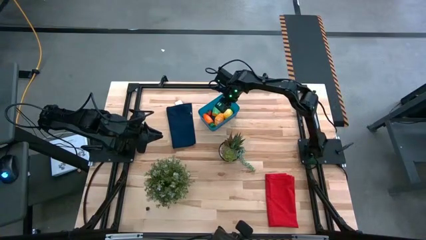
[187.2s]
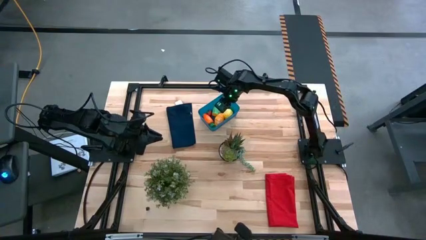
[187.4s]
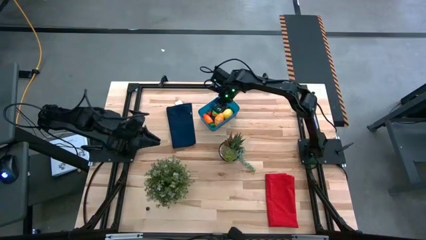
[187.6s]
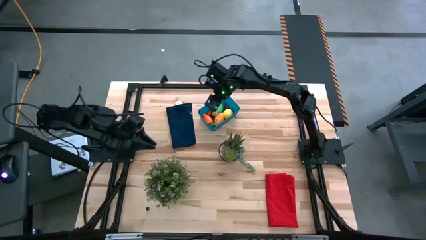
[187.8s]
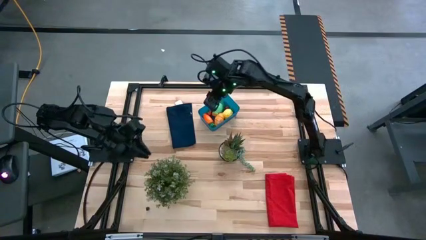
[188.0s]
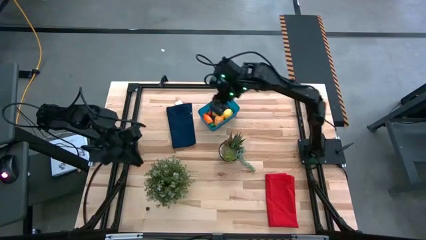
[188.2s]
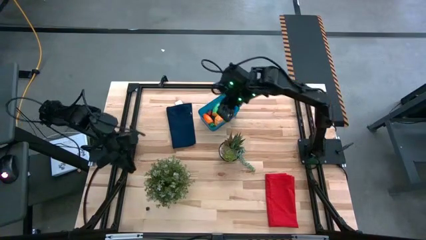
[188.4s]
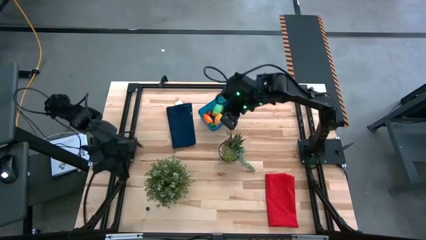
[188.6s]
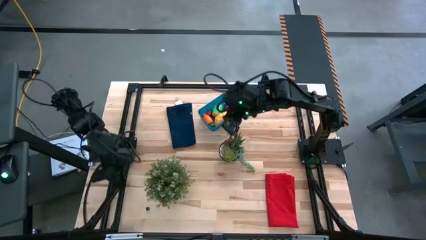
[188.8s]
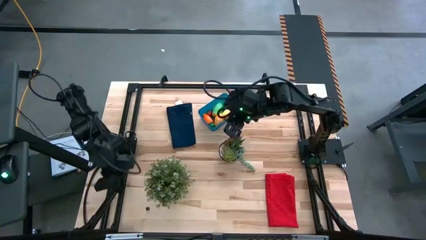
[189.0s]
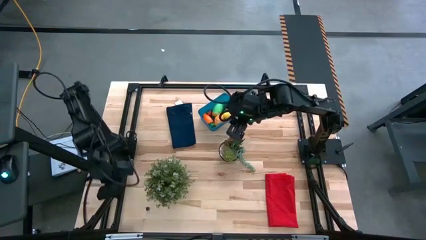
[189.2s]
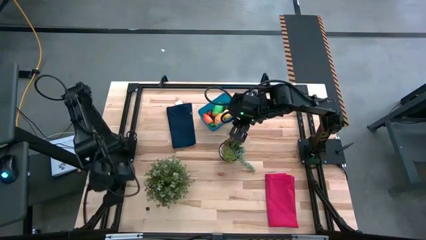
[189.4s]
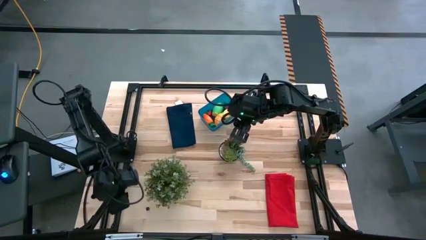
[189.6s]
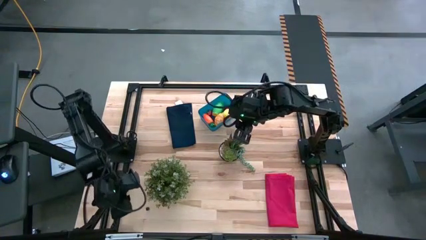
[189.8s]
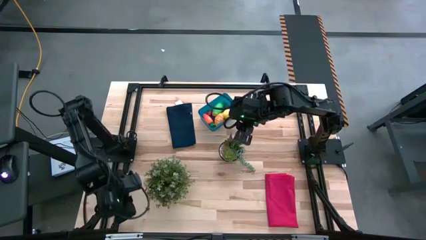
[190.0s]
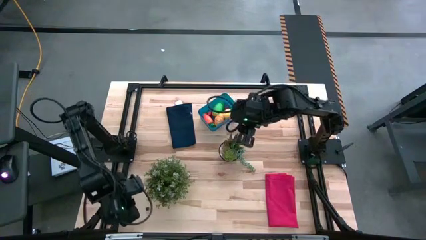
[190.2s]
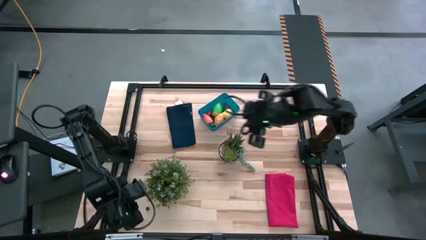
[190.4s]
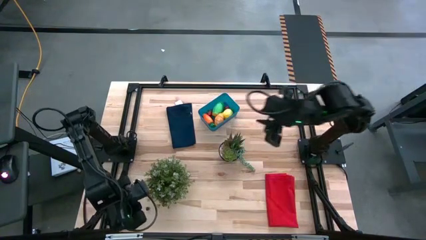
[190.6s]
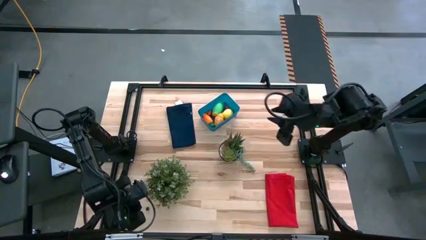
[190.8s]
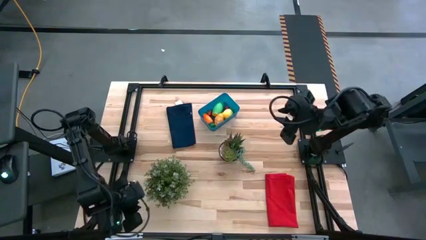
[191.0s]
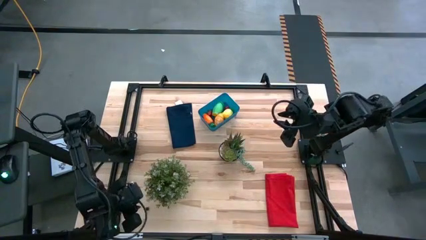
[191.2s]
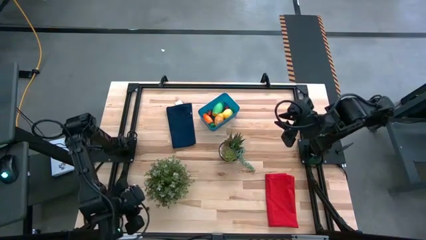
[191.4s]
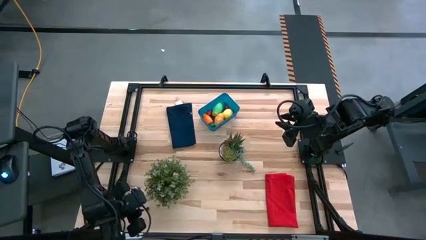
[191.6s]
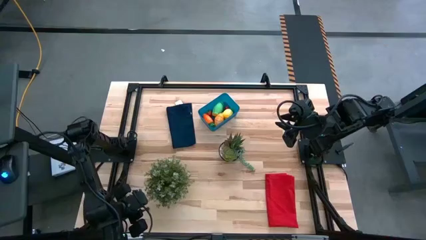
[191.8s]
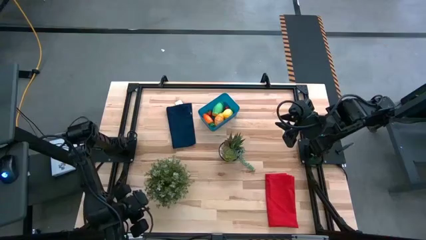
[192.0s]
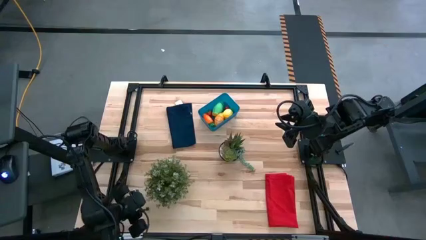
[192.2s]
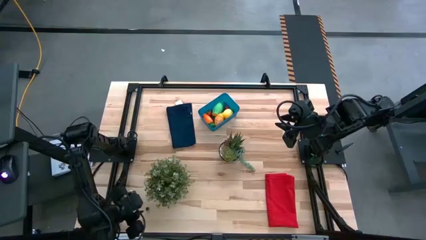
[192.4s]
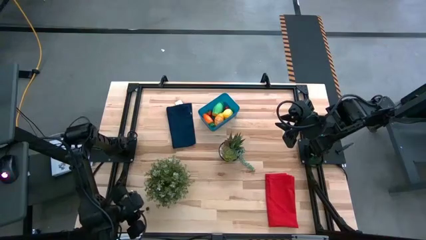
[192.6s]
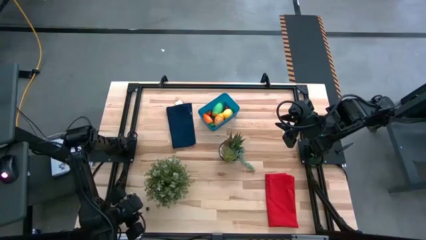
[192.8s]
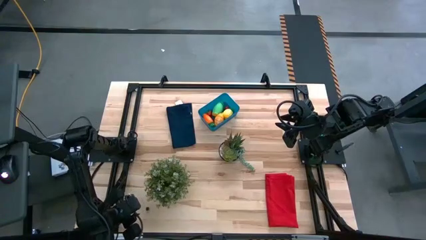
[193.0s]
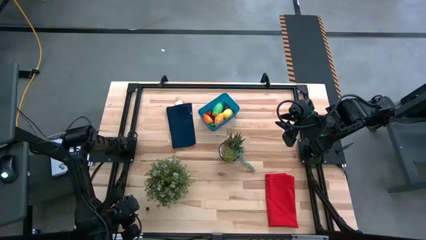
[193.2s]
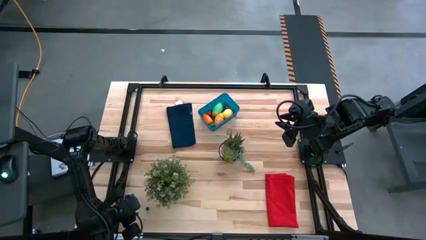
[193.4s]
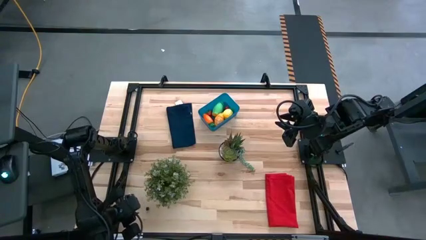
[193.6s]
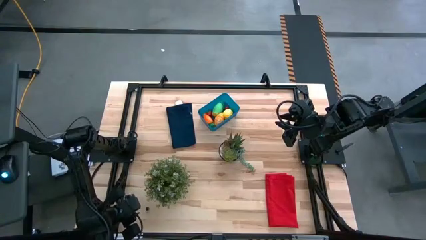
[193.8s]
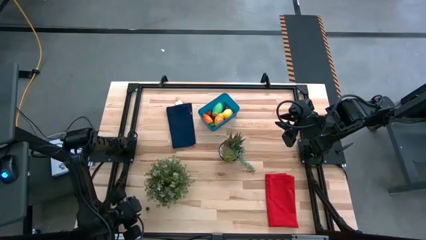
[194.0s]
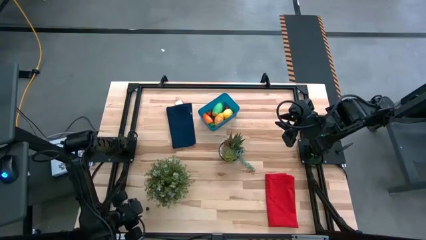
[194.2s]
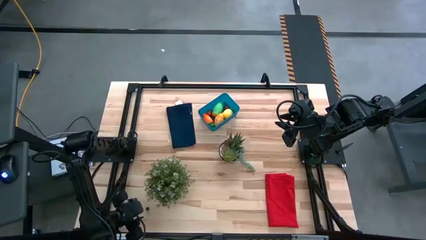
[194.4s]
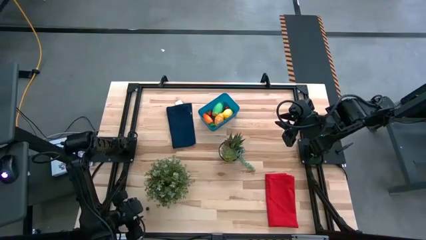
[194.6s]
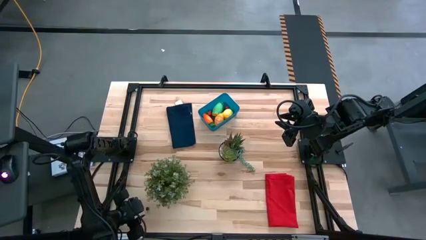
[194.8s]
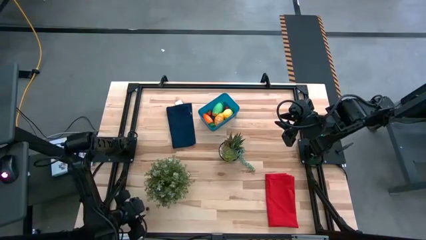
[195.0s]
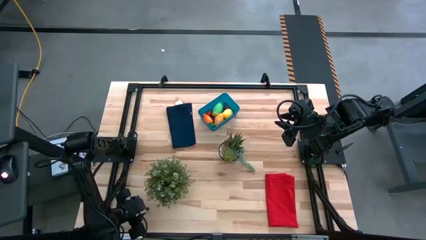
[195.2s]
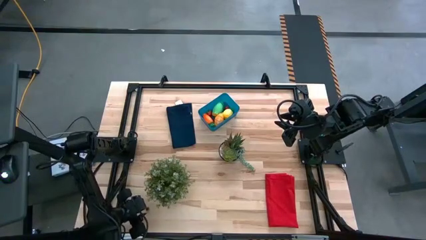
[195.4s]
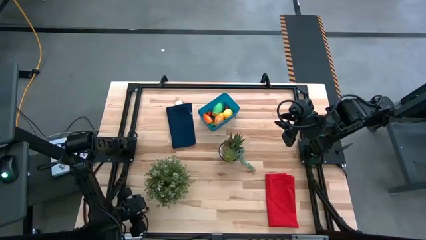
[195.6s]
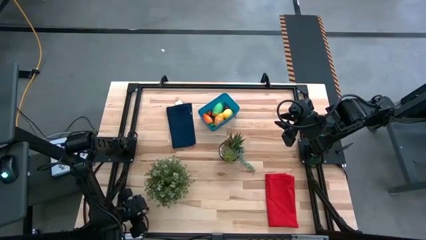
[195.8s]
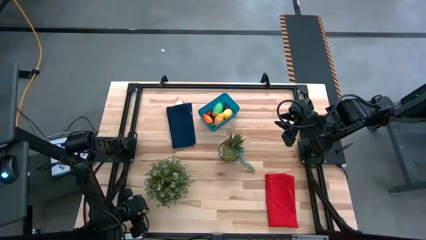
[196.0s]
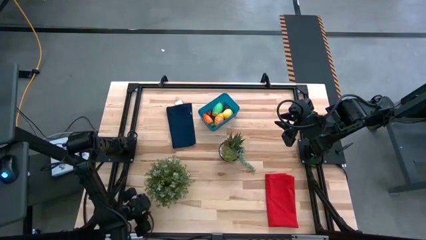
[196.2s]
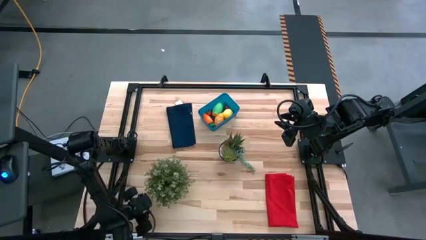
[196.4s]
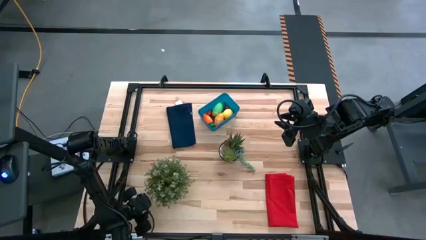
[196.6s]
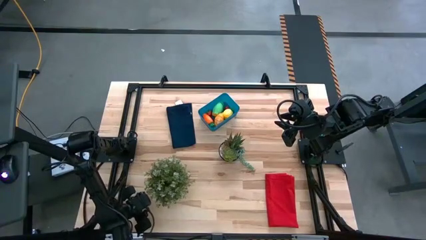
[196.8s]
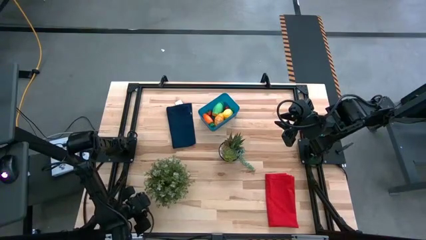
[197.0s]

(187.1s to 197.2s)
Task: Pick and placing Produce into tupperware
Put the blue berry into the bin

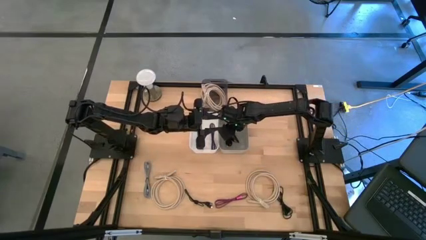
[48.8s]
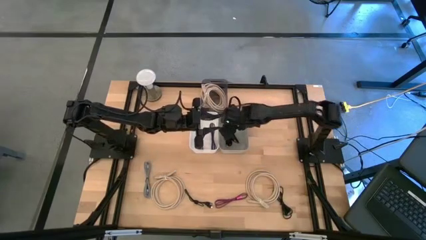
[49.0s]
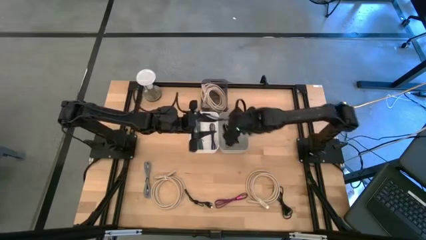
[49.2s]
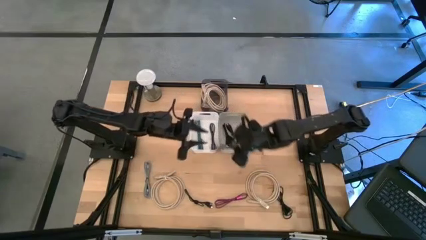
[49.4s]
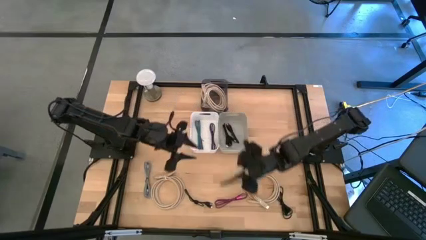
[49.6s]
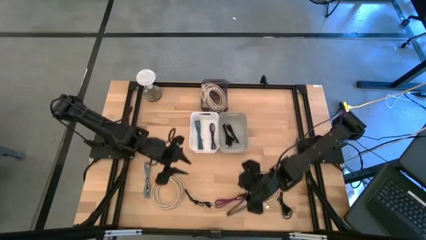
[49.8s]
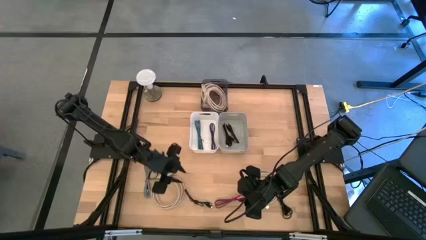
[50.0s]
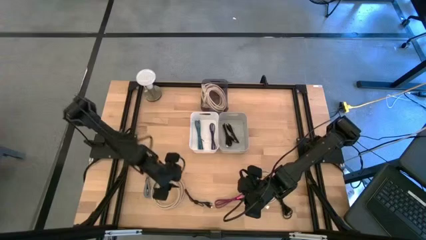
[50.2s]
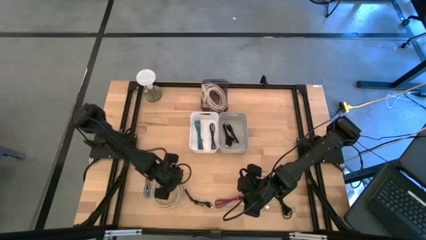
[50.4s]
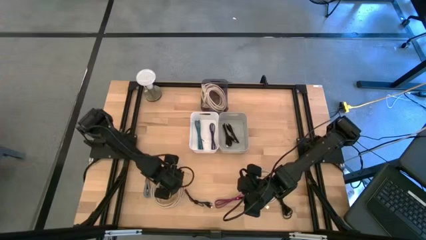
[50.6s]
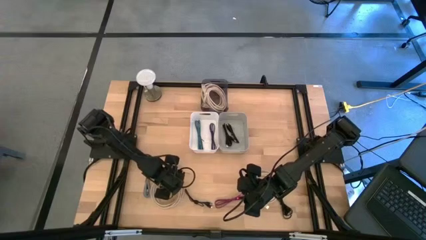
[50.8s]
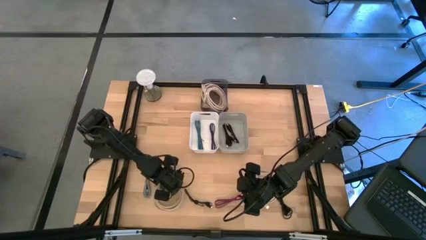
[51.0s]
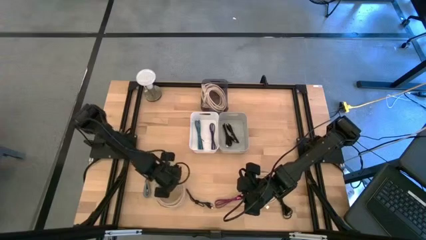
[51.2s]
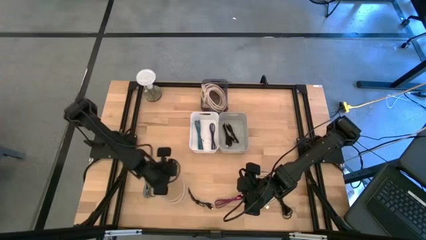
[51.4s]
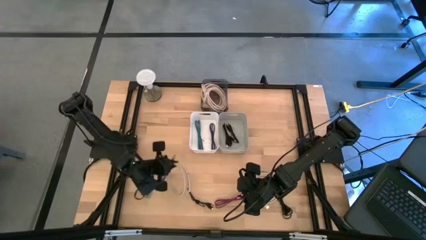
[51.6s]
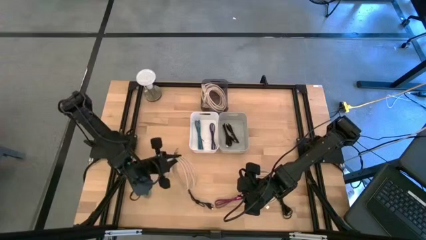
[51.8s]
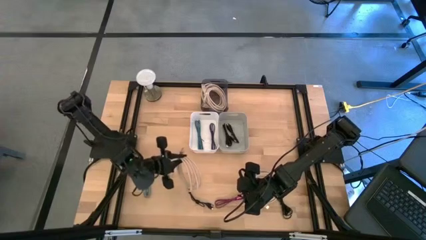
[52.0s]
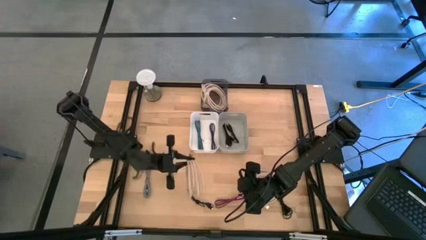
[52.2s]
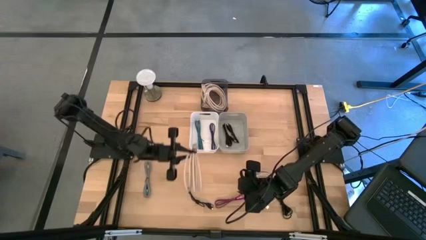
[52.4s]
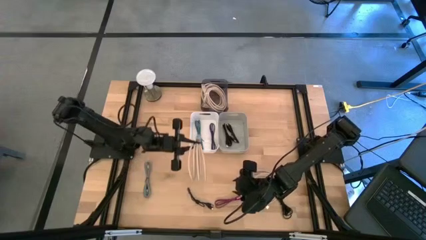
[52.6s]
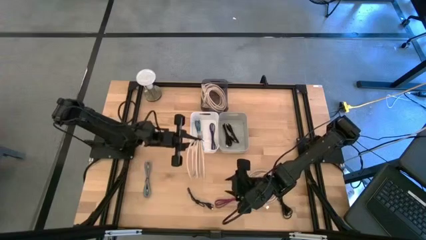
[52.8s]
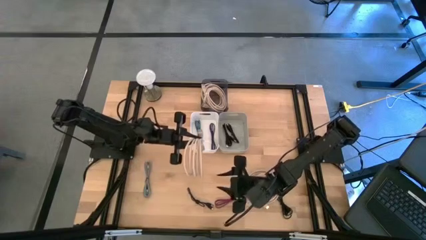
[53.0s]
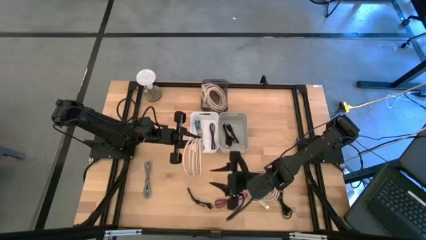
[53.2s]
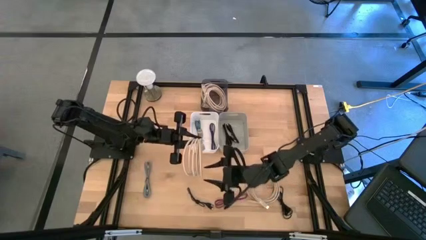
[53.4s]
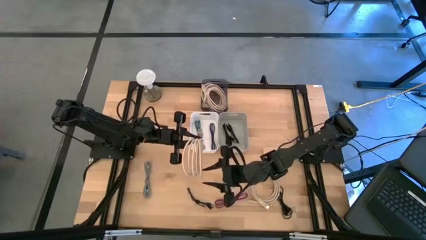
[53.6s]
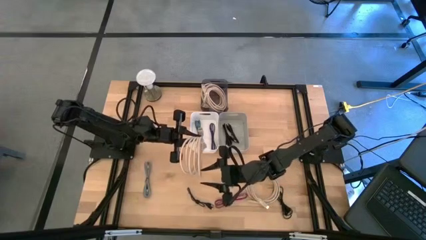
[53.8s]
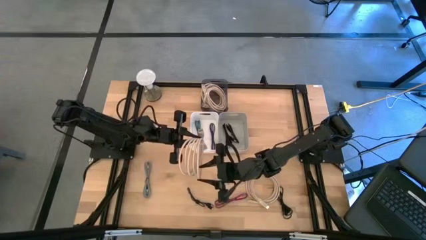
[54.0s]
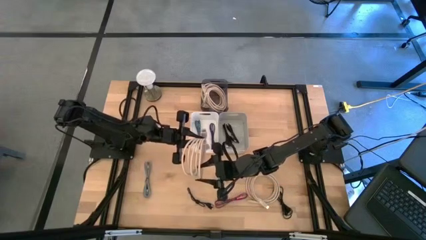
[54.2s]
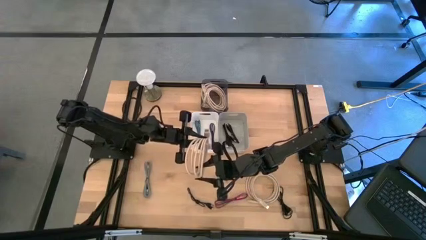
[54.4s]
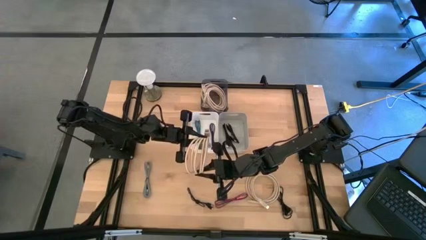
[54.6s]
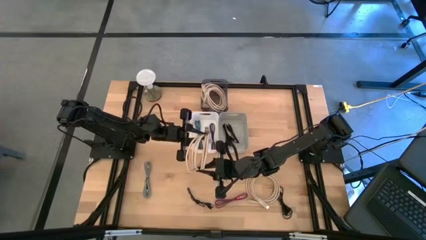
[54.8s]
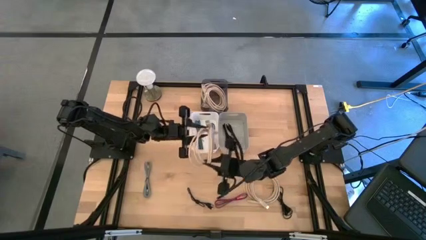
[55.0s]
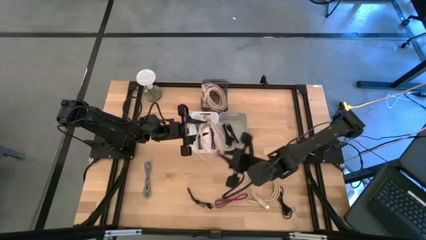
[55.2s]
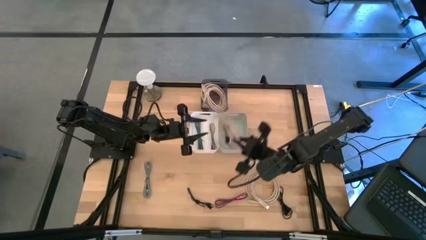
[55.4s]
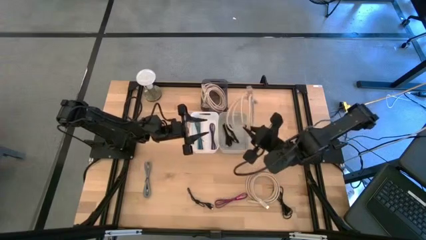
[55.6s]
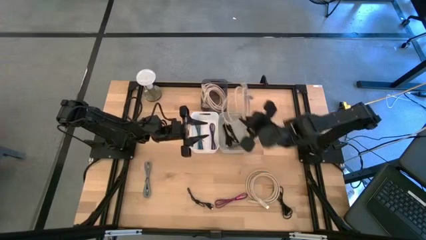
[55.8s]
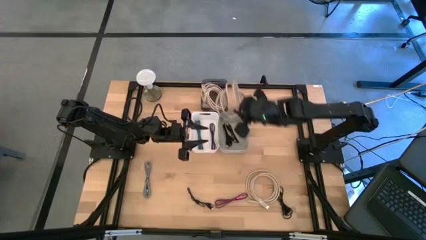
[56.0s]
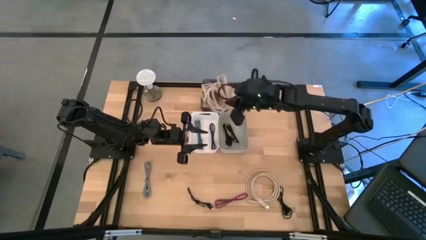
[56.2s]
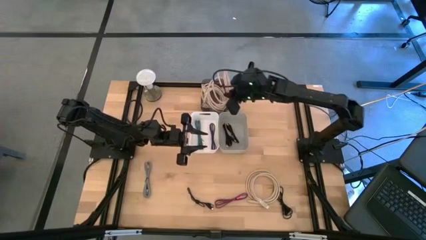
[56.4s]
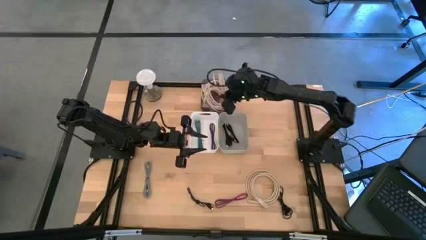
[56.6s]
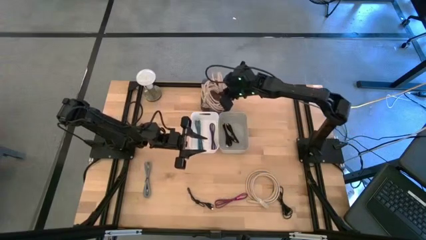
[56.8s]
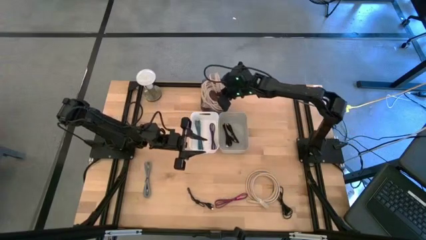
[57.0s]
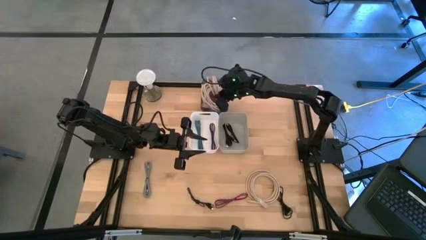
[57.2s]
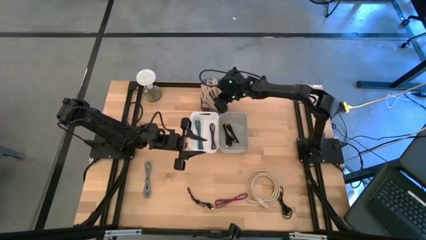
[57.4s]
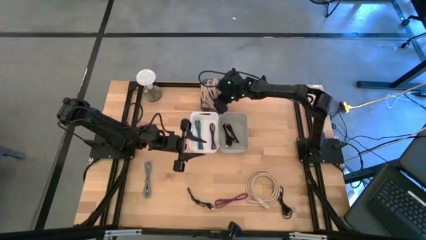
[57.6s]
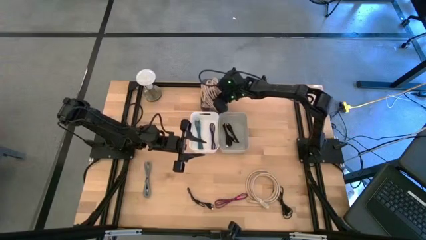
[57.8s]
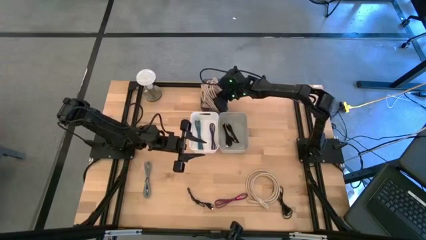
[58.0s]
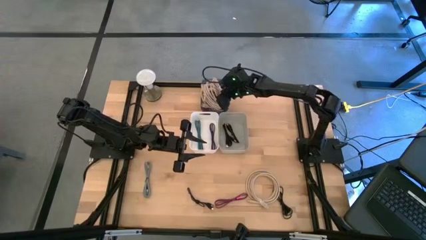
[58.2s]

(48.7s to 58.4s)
Task: Pick & Place USB Port
Put the light brown HDMI cable into the black bin
